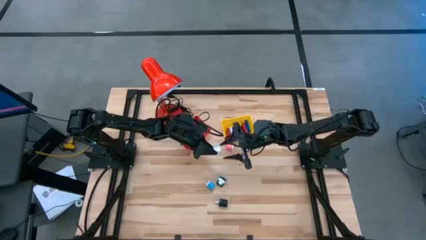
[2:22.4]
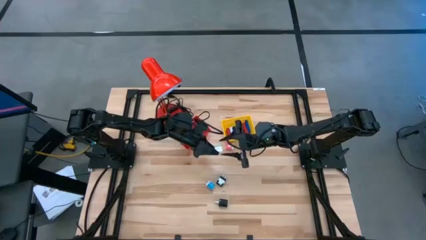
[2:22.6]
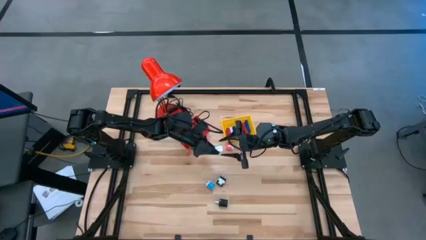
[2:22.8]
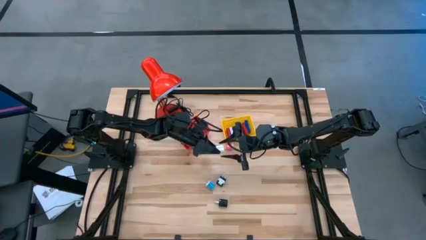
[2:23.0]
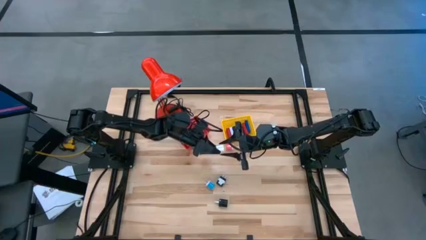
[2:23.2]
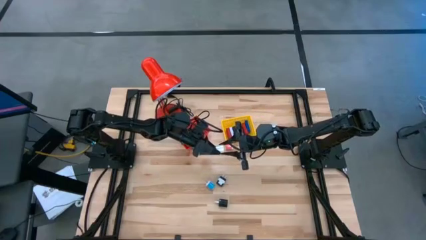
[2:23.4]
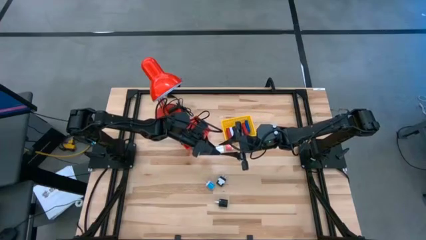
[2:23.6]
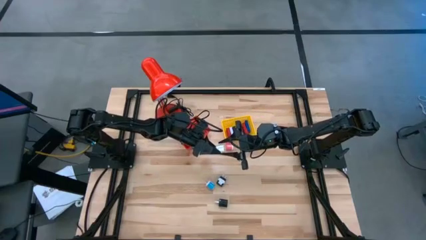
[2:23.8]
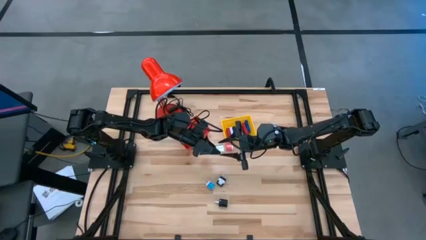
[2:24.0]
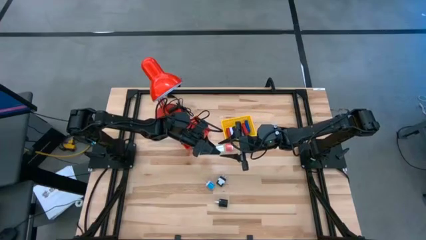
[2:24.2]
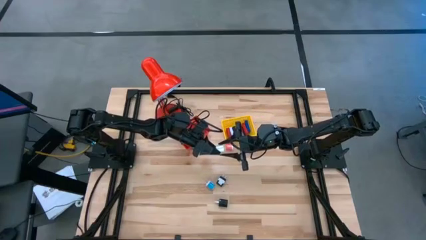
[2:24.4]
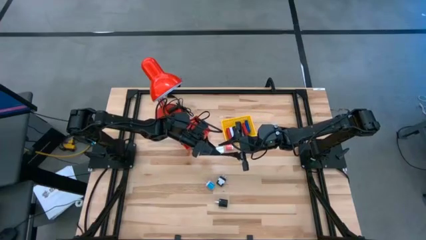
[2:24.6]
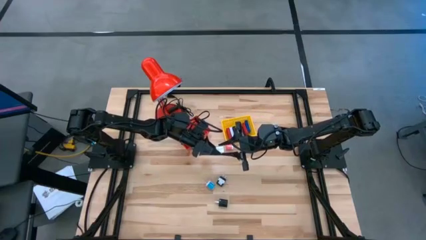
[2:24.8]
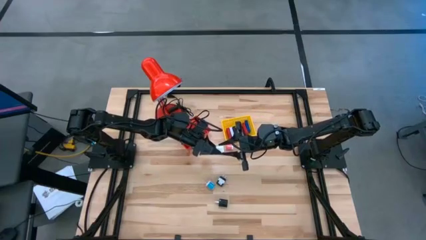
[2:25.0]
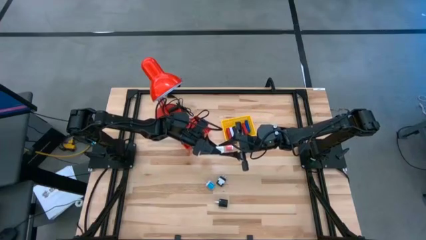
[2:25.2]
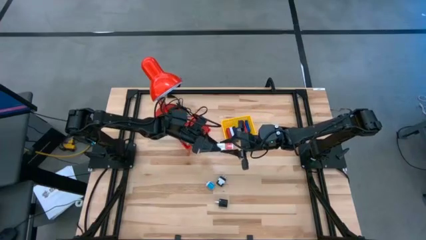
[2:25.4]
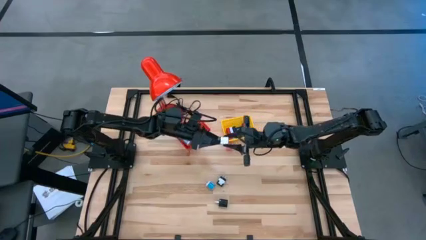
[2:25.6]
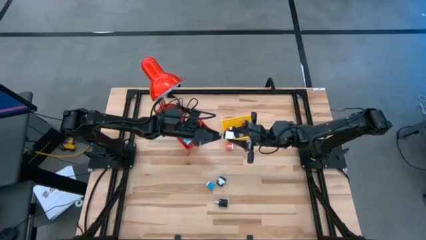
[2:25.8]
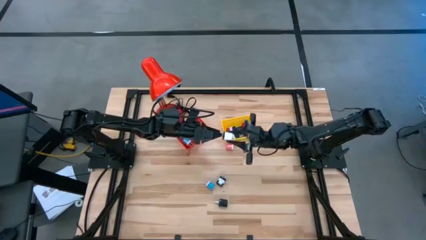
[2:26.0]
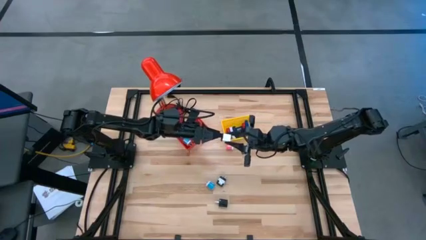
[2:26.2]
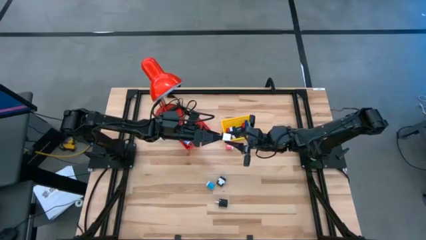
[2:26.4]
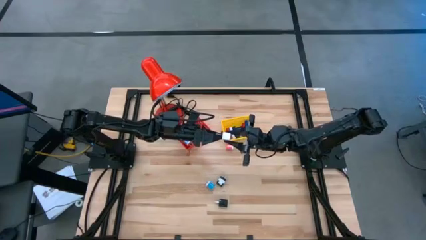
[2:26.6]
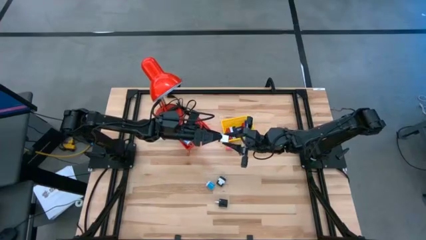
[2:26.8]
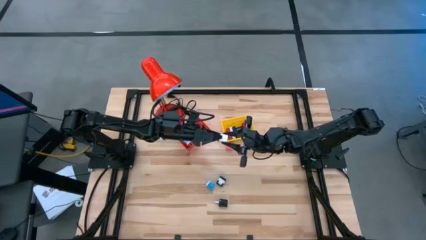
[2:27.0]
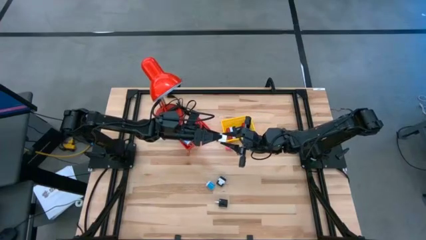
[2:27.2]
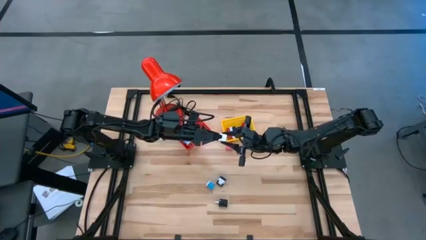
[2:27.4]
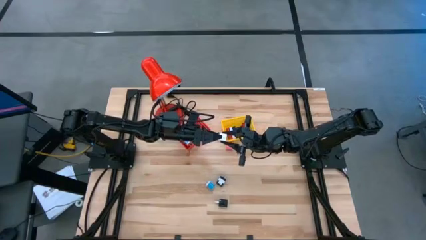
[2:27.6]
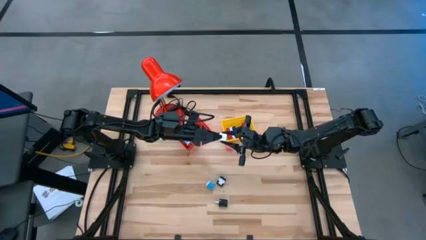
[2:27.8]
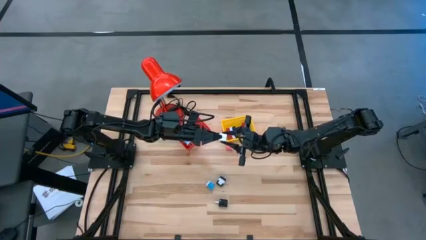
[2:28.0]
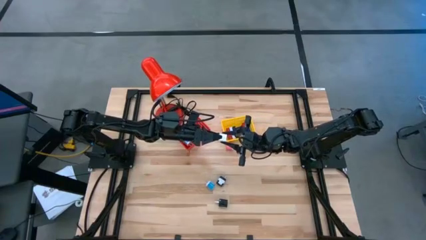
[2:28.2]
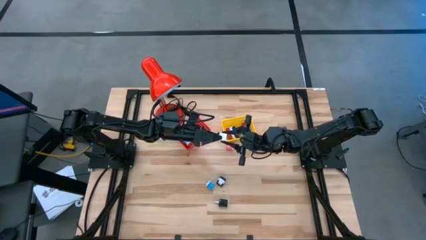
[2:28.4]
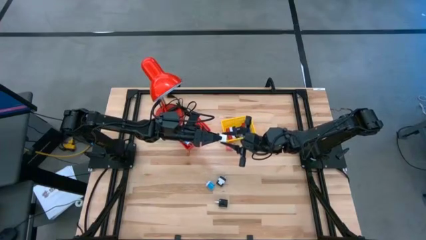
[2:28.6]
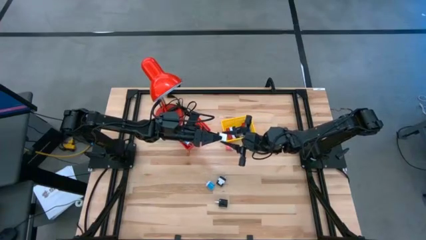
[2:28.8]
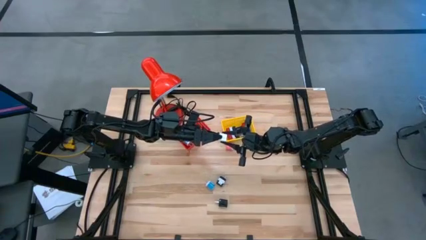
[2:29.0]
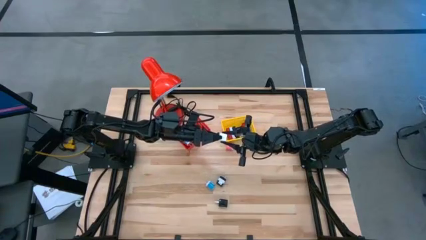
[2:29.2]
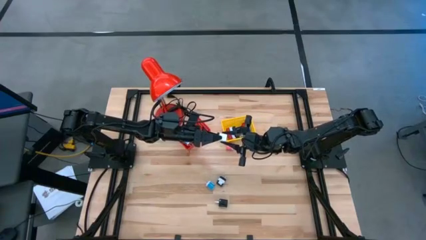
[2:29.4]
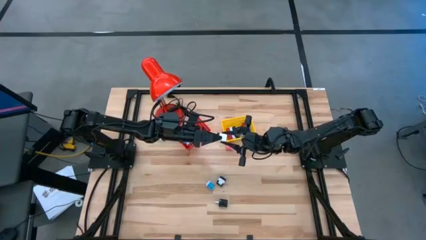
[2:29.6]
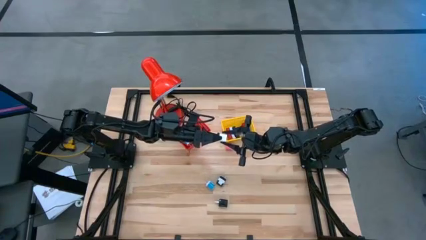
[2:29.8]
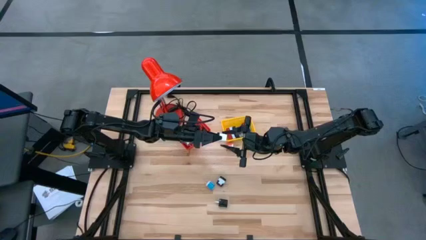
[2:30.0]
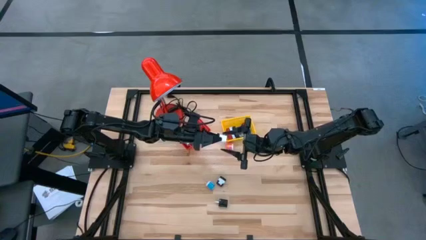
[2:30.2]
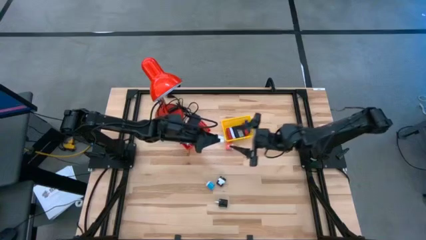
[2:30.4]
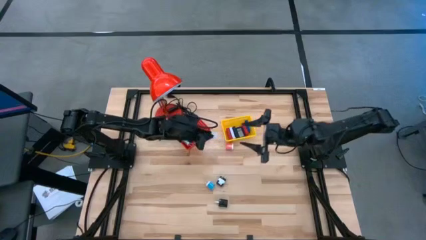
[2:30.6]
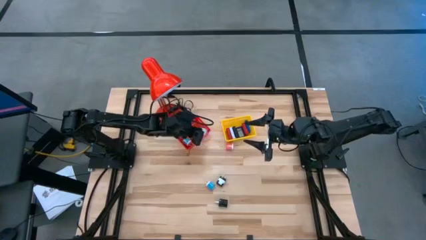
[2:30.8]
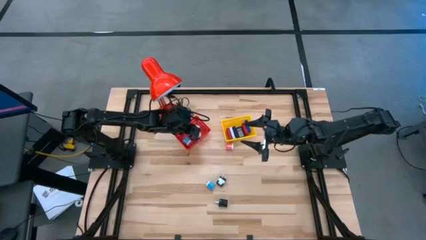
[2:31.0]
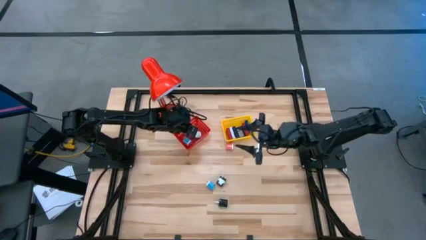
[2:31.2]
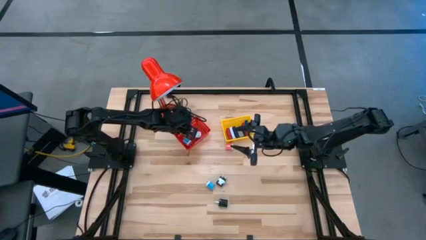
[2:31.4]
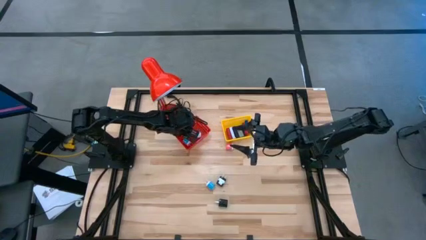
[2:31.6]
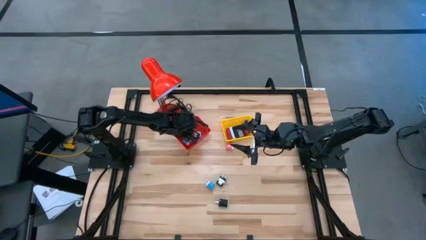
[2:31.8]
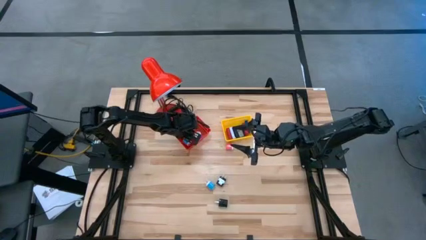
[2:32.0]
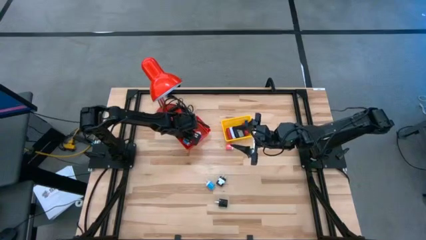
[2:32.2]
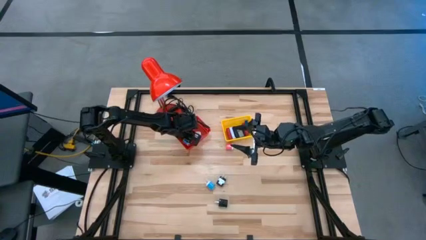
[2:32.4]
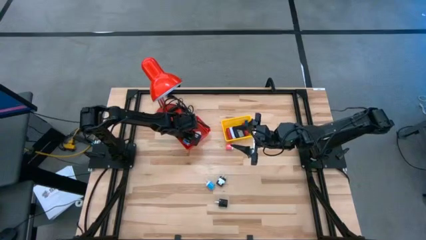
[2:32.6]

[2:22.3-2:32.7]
Task: Pick & Place Office items
Put the white charger adapter into the red bin

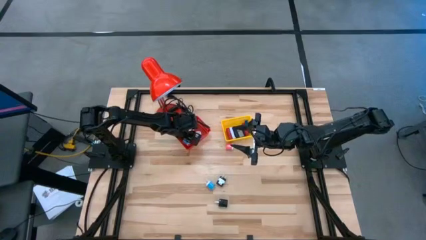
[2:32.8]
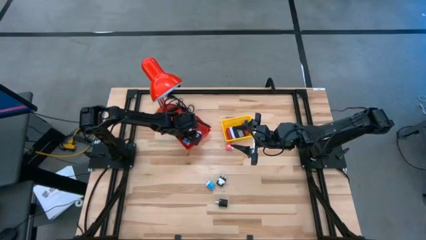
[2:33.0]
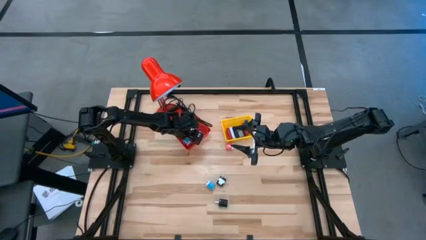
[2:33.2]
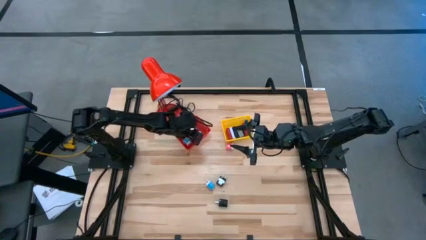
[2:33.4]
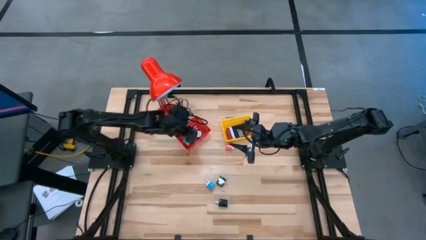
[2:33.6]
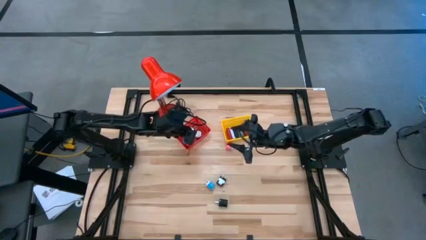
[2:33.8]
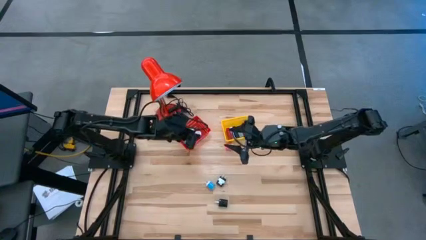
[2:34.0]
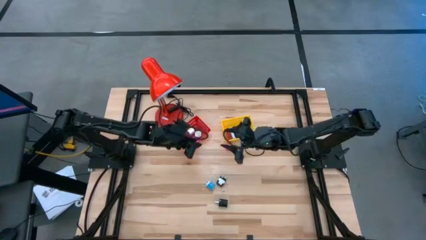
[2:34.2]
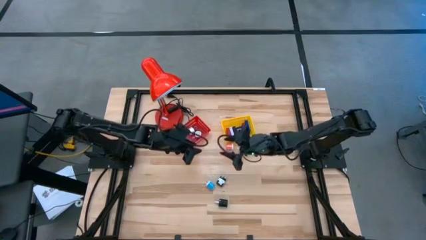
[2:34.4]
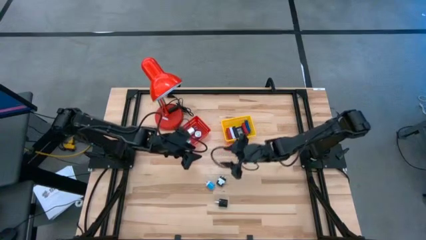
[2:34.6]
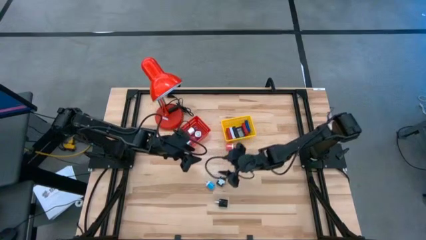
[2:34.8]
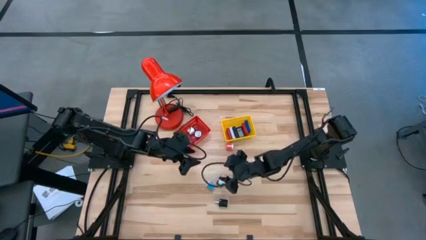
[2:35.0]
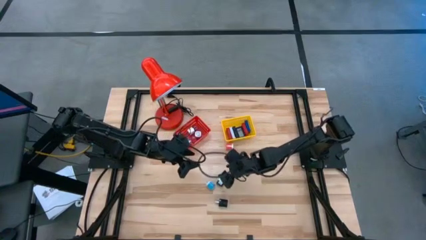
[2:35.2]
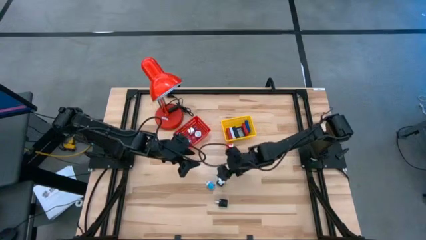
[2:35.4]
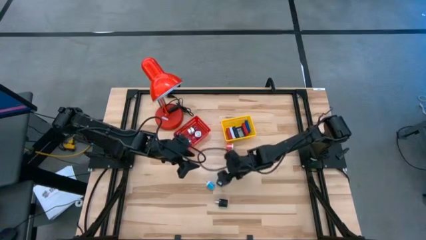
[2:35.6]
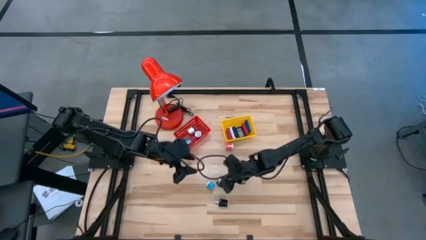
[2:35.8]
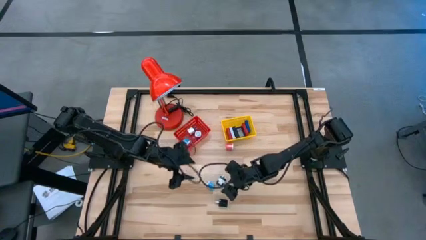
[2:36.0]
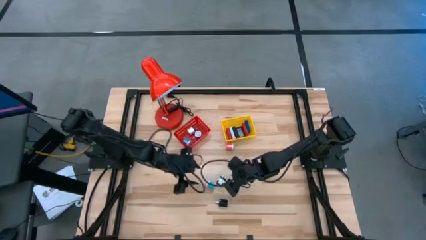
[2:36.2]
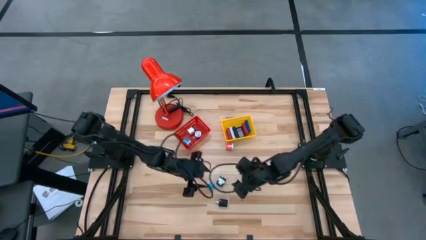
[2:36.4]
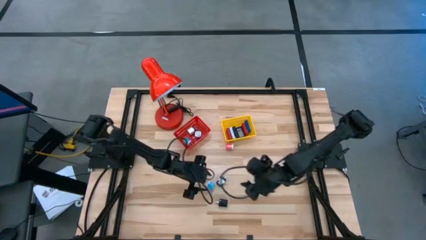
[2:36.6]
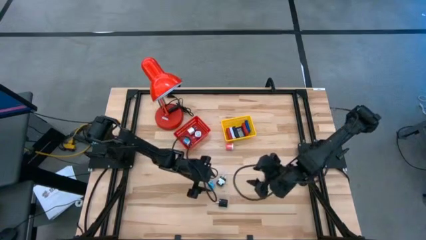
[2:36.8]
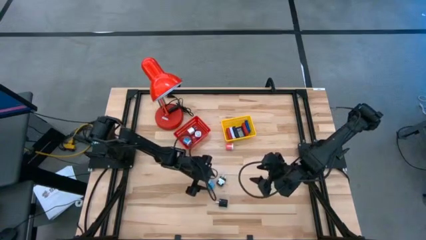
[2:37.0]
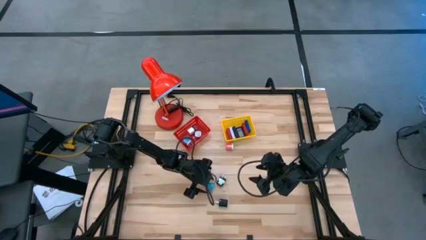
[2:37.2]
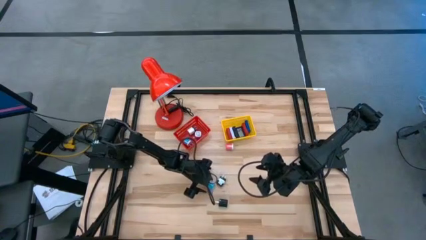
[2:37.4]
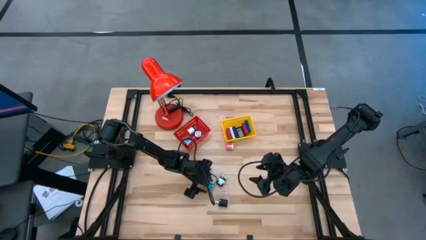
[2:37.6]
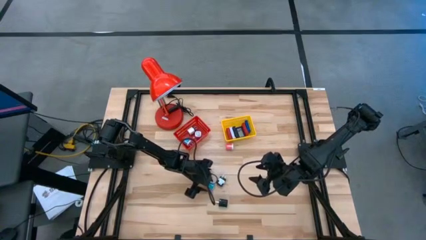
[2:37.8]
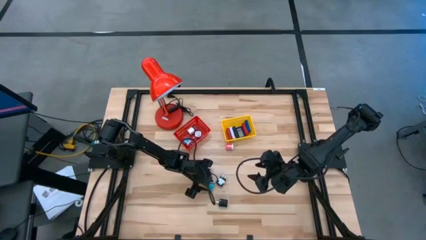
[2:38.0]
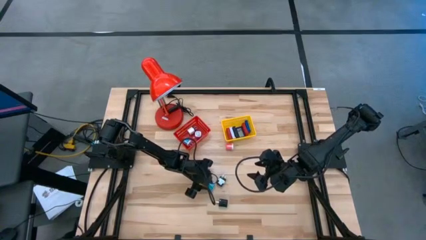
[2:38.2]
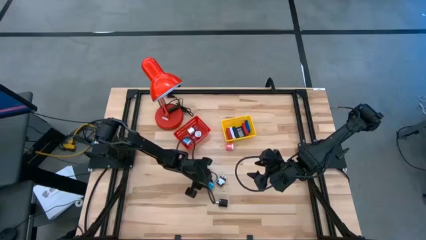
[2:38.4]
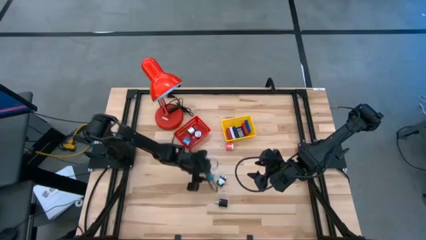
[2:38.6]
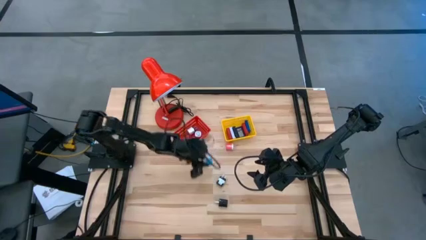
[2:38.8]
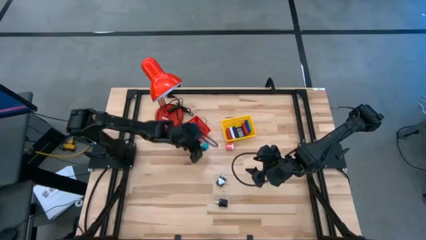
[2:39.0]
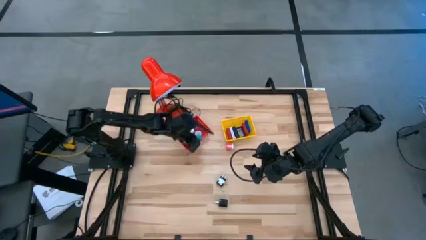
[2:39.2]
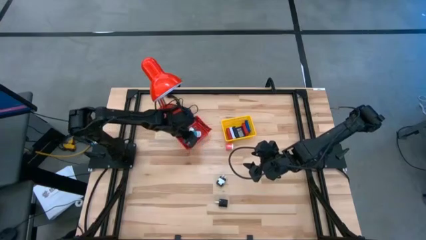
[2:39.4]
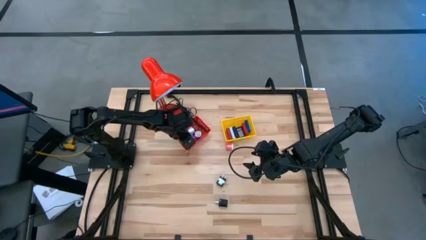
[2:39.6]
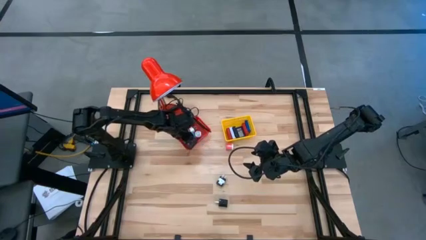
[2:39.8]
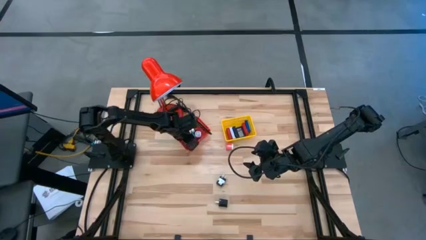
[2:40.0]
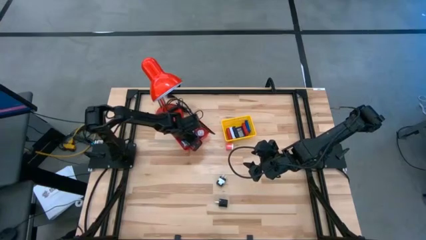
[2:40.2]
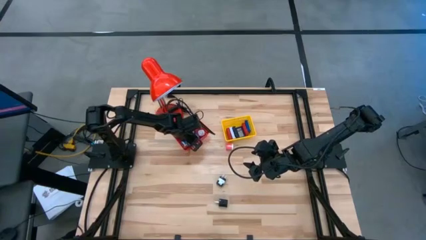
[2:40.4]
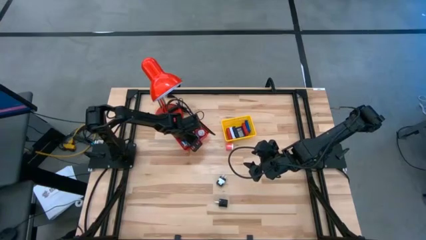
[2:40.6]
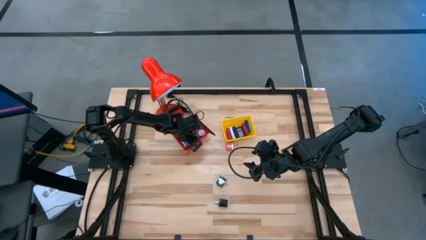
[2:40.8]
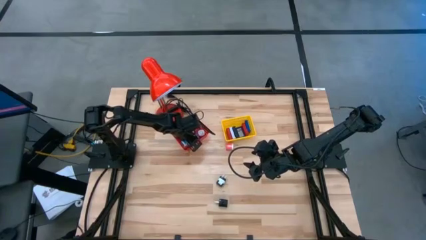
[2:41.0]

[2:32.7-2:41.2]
Put the blue charger adapter into the red bin
